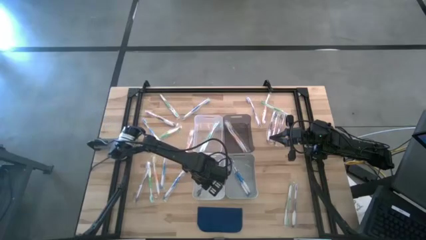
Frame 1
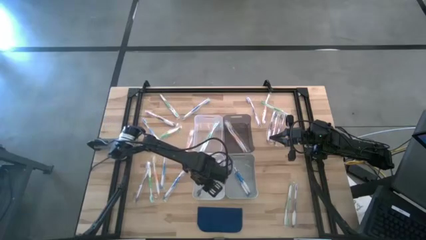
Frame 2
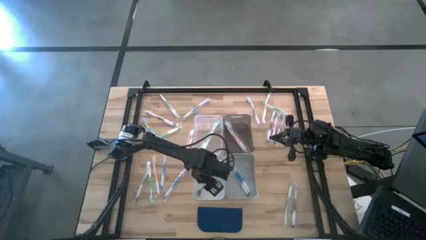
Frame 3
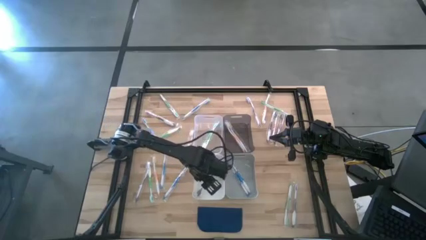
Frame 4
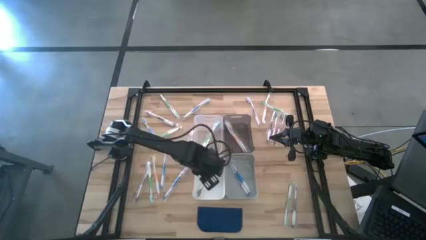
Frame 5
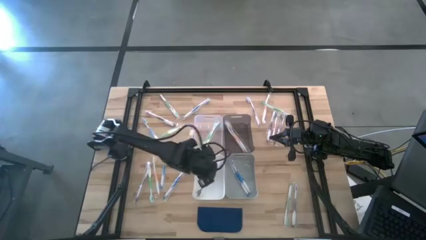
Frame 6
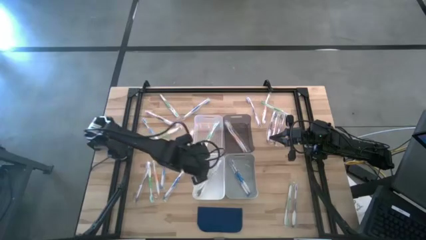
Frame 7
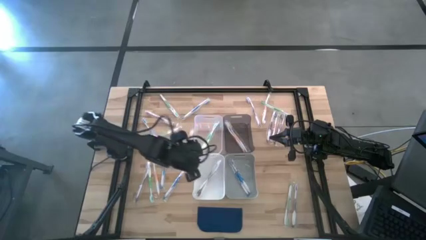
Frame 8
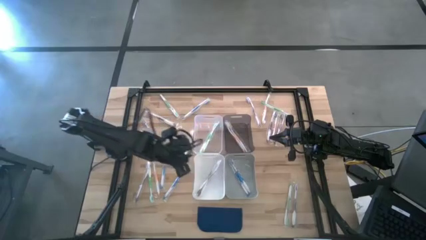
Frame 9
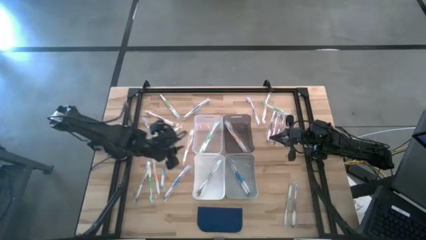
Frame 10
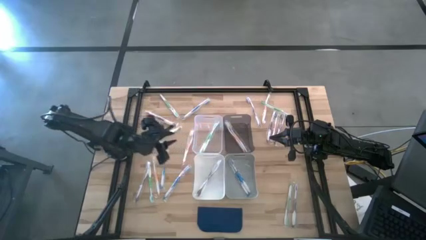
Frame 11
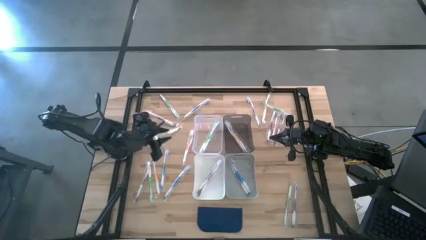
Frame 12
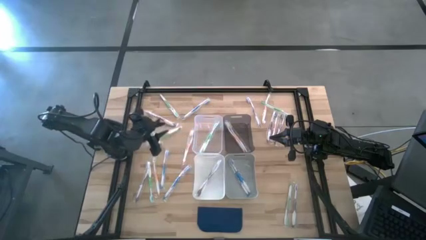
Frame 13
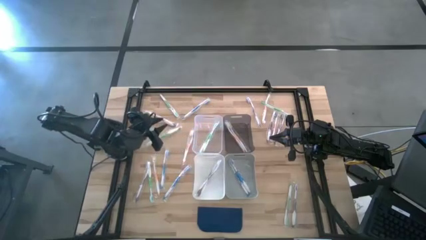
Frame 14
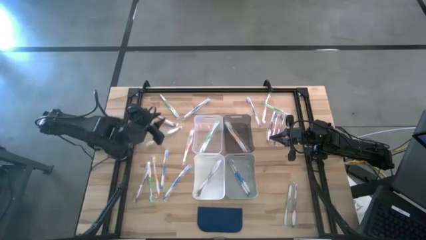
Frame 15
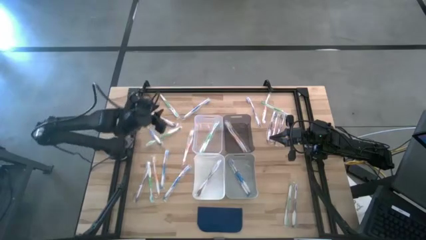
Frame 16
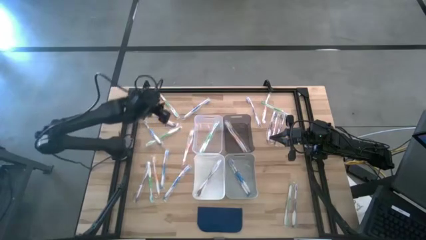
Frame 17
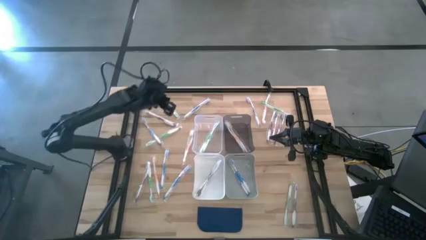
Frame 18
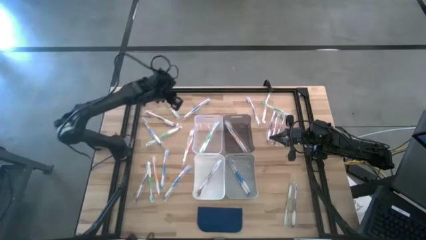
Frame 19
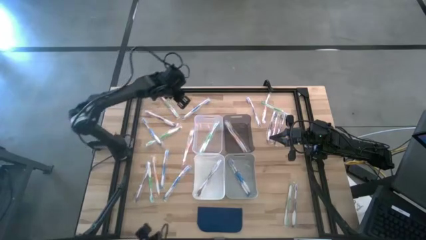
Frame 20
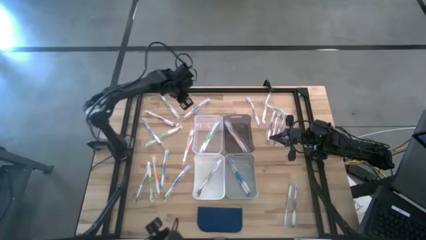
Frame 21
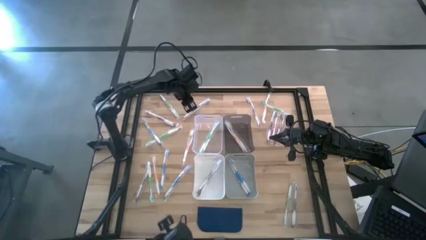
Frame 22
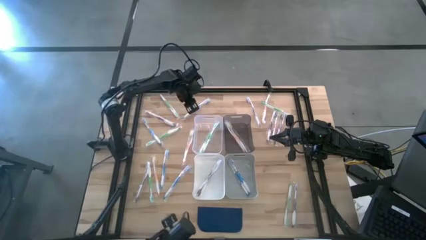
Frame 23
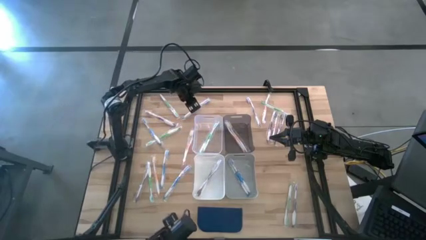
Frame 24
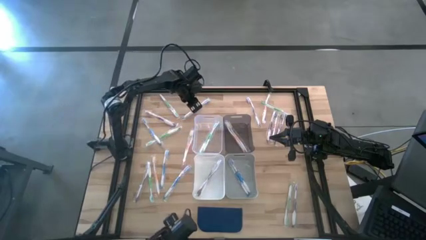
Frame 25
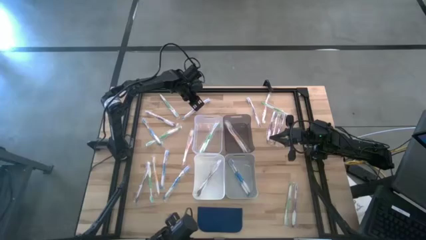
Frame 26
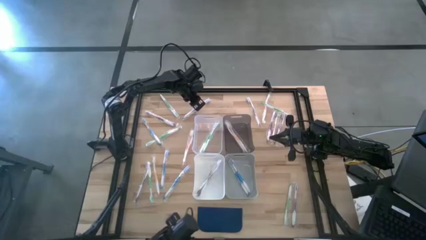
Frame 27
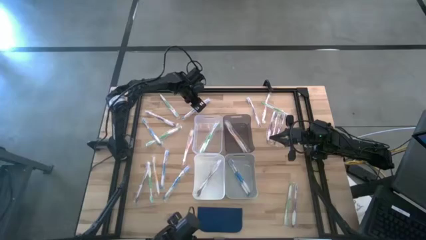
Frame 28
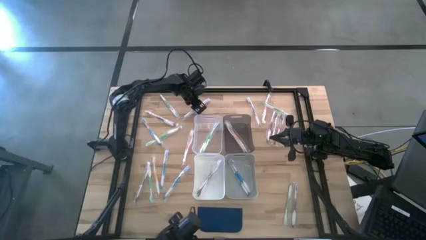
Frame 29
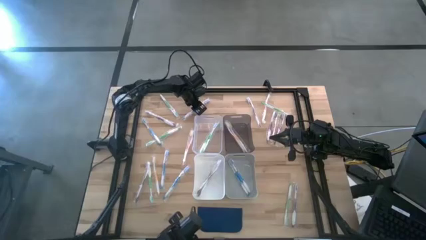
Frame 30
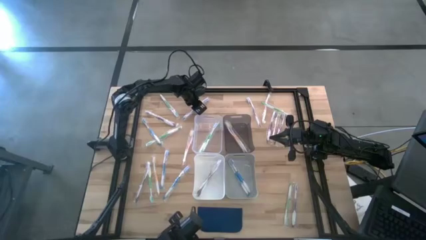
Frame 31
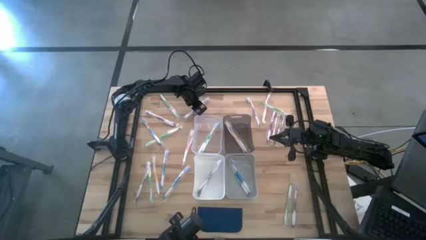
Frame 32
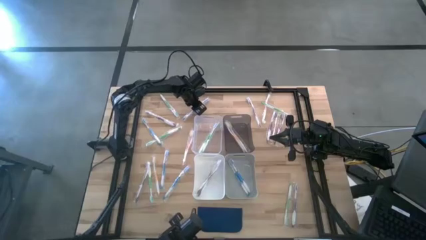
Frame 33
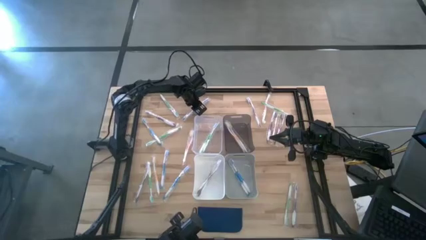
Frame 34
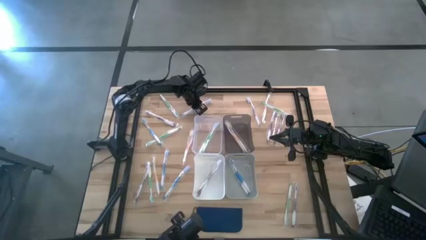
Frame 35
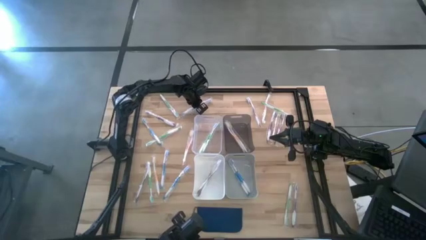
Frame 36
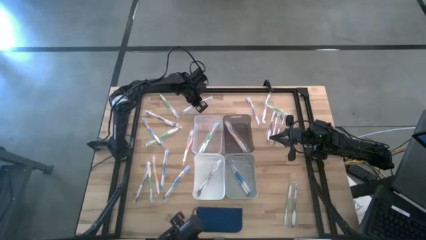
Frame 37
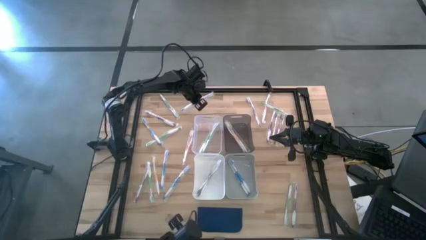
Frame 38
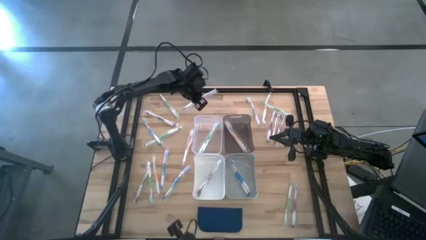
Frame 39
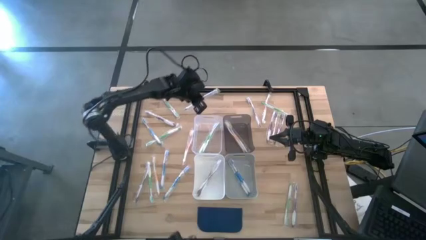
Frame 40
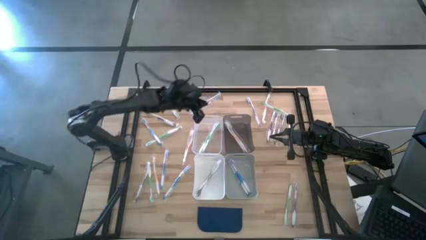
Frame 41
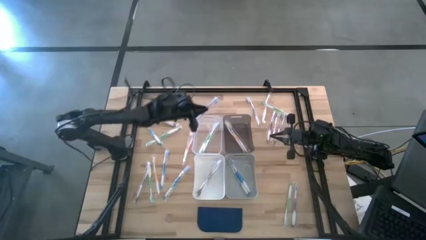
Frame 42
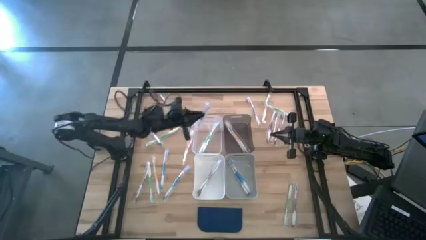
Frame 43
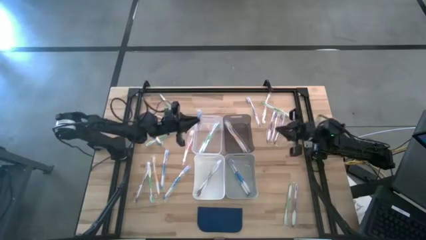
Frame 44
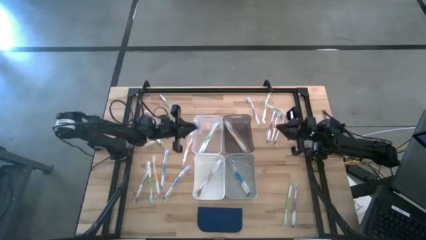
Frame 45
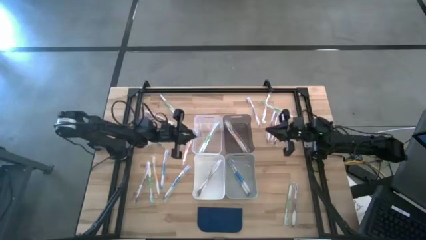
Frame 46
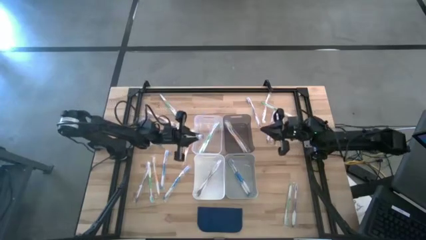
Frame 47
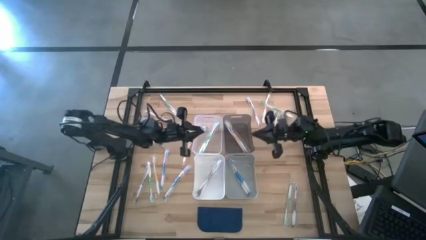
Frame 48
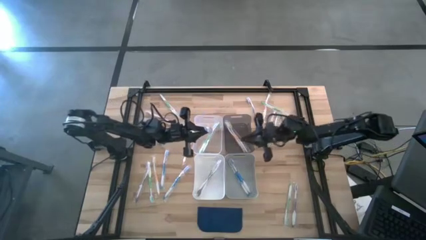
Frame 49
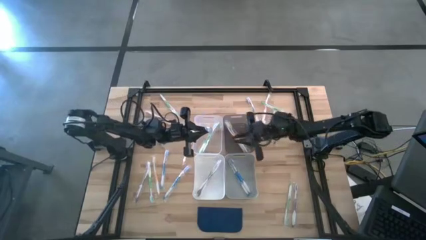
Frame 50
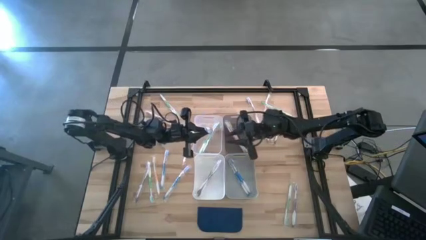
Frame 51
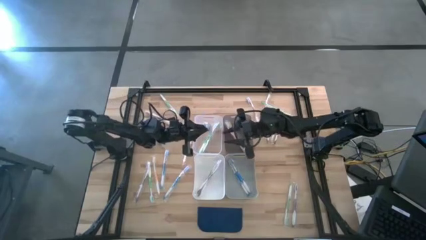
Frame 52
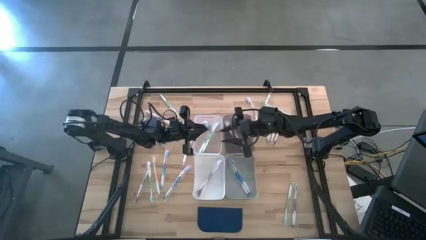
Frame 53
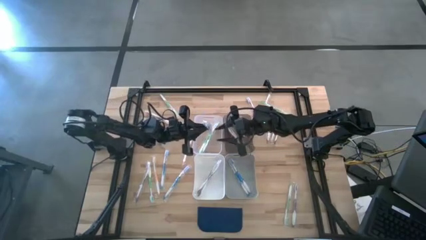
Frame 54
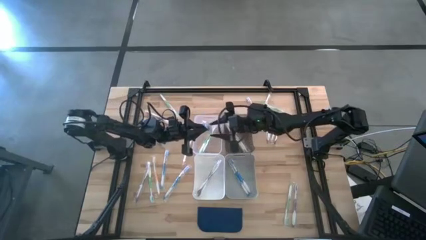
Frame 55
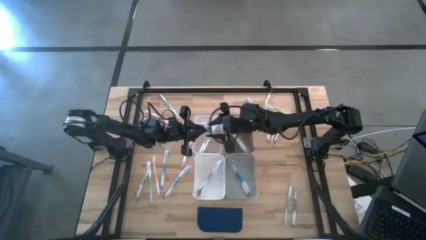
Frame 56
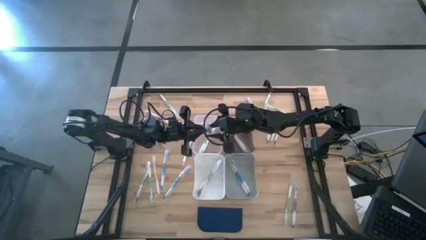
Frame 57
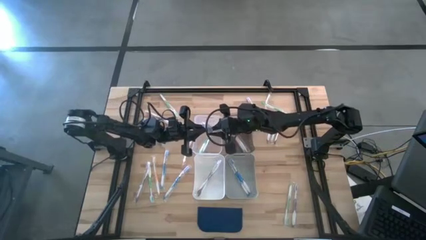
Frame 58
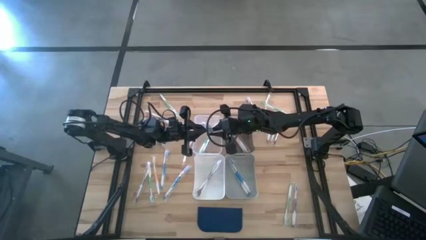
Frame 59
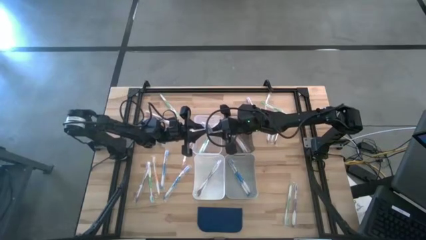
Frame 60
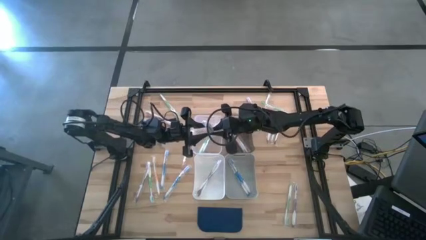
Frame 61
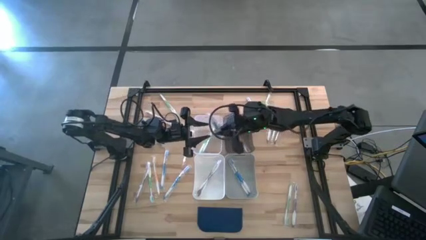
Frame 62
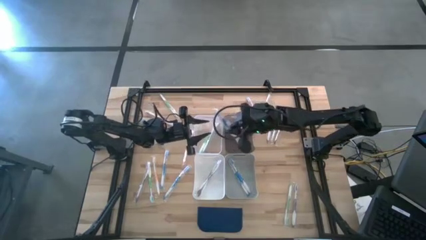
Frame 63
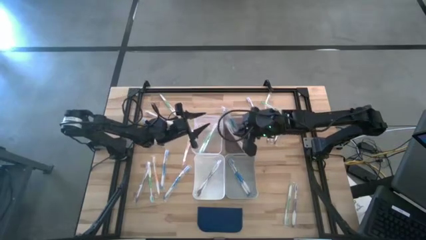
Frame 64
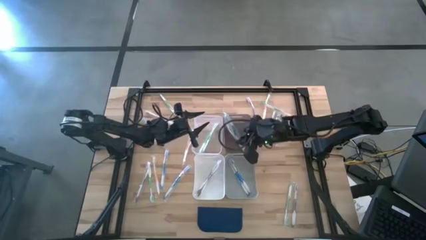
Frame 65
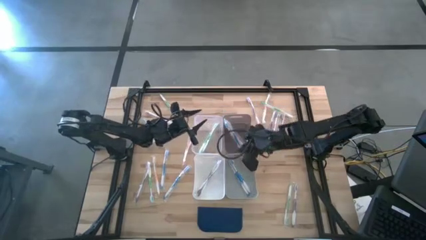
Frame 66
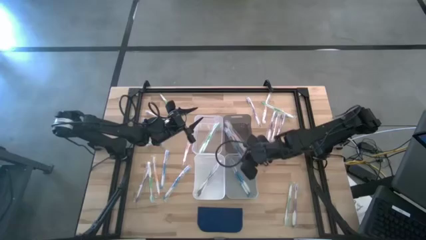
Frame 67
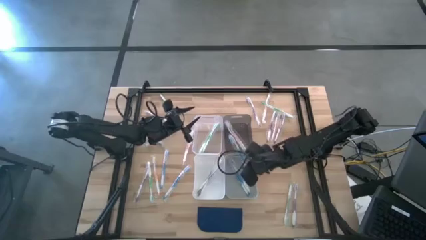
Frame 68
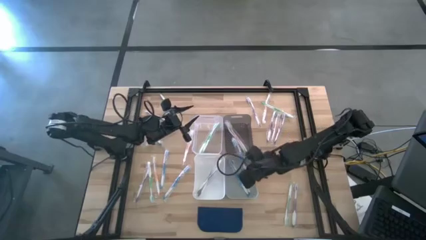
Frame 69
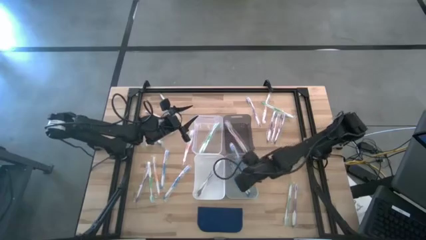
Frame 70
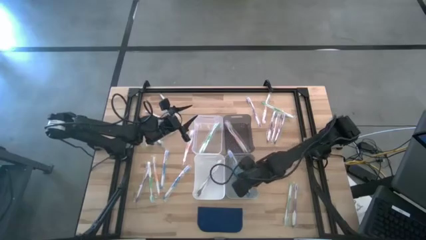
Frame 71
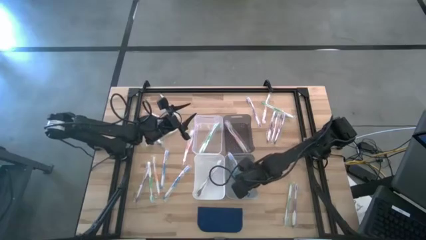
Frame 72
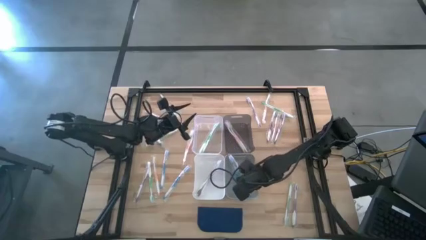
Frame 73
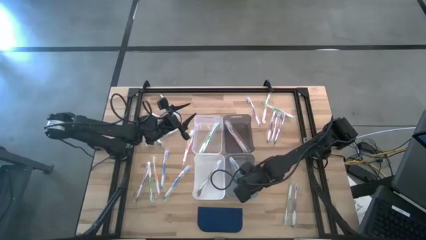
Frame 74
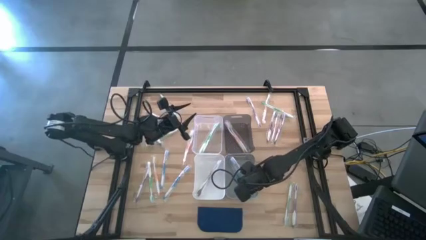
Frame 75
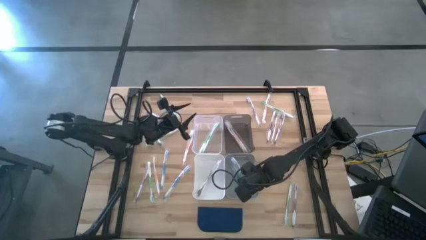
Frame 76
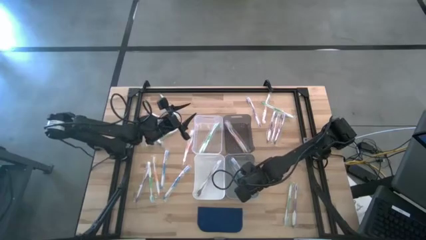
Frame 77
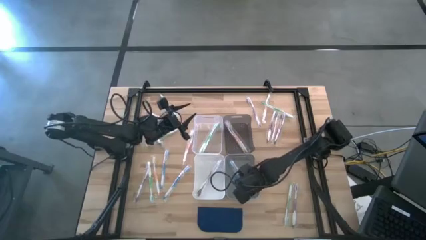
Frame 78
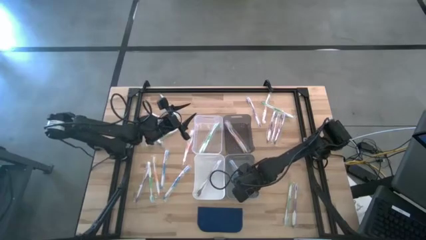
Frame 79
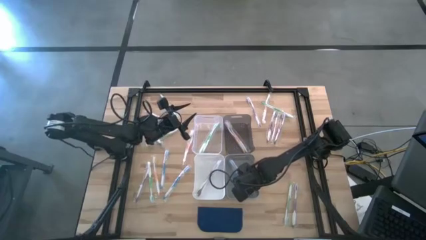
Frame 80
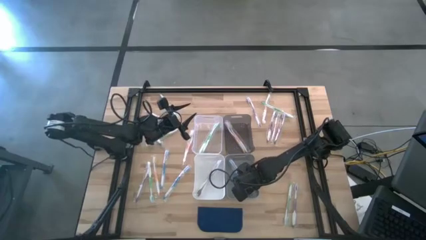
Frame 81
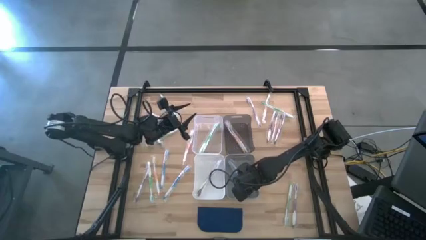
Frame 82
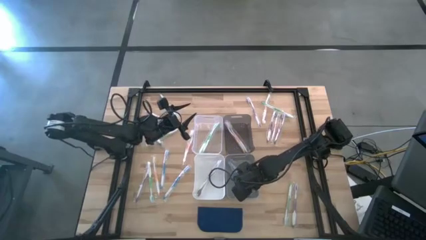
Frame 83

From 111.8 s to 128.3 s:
Task: Pick & Place Toothbrushes
Put the blue toothbrush into the gray bin

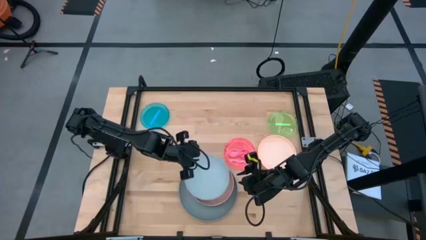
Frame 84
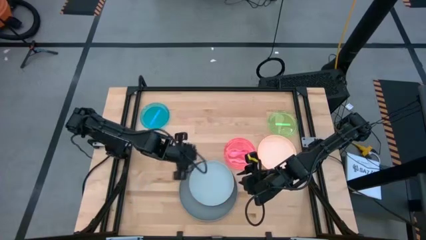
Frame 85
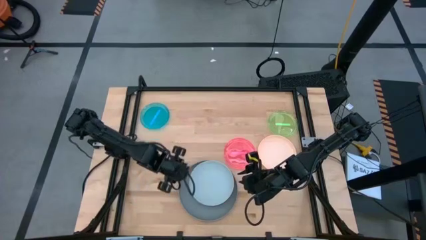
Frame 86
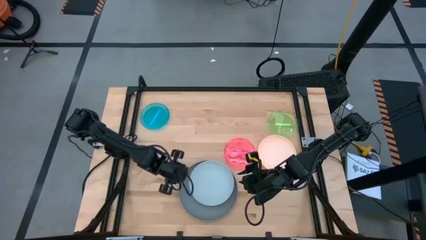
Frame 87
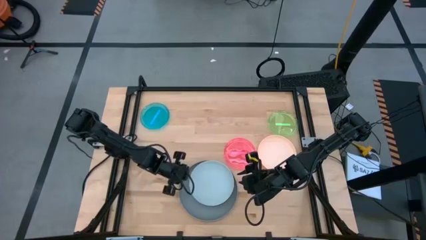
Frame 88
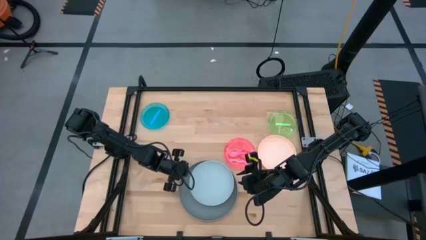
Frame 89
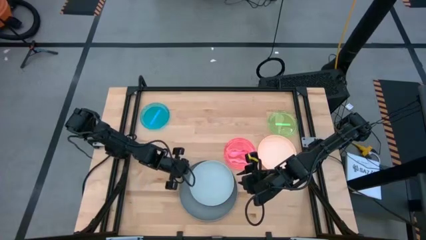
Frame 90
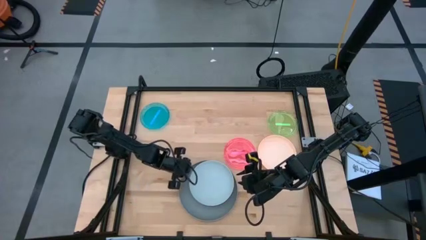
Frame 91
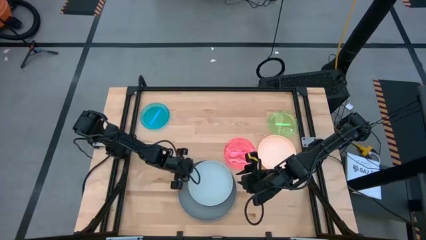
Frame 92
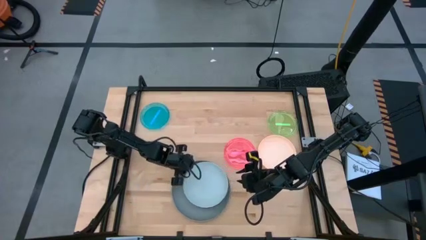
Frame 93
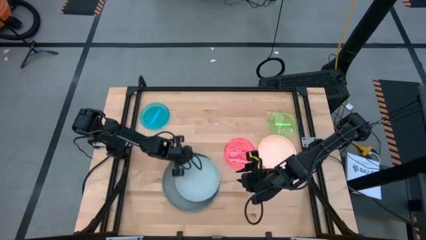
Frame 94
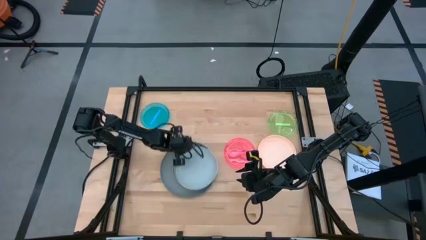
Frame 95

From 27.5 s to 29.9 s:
Task: Stack plastic plates
Move the stacked plates to the center of the table
